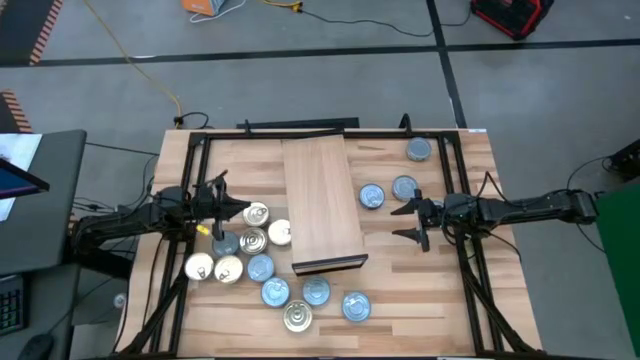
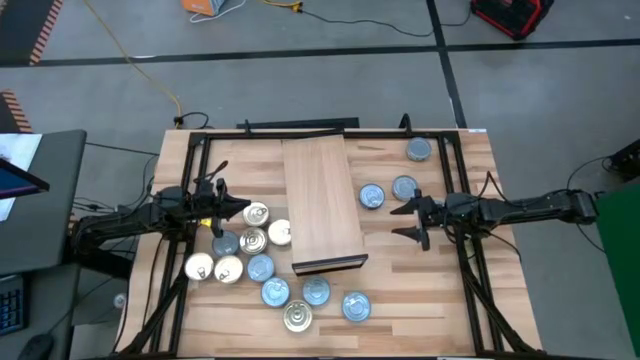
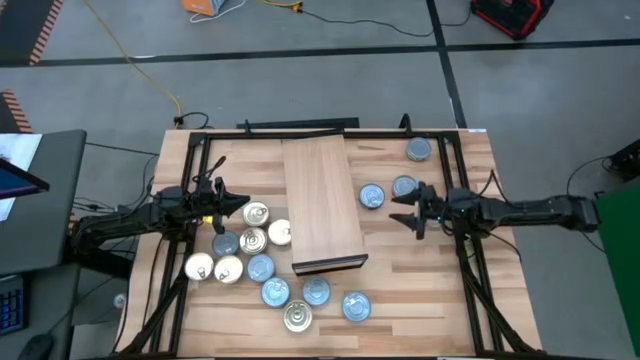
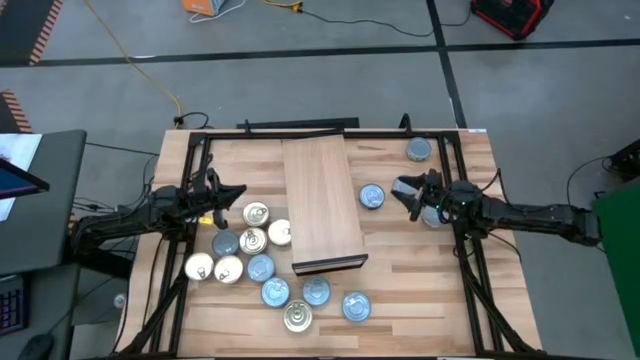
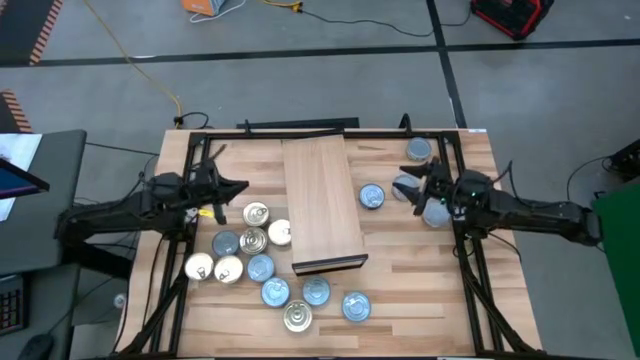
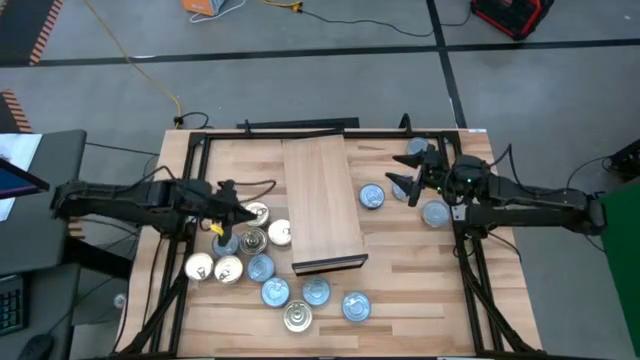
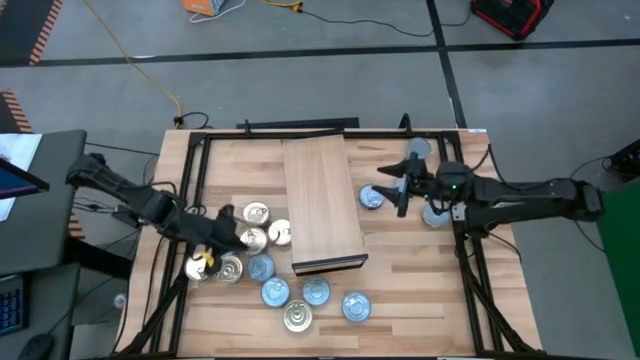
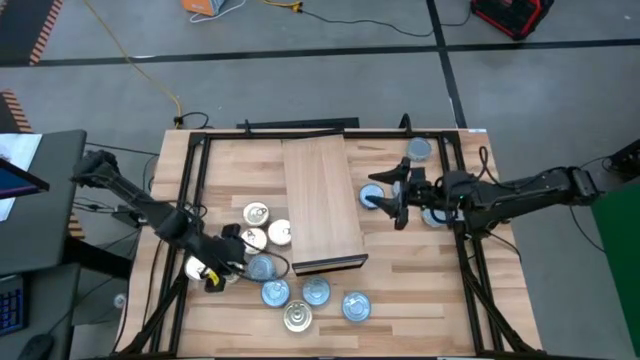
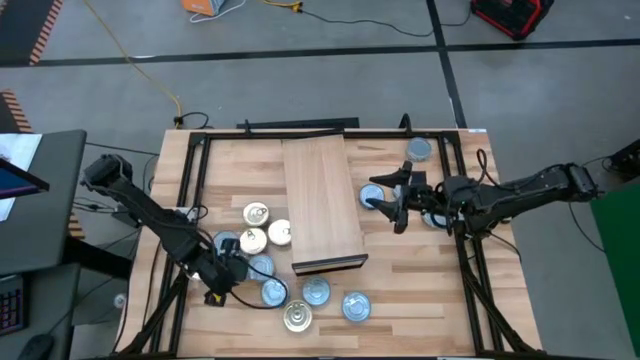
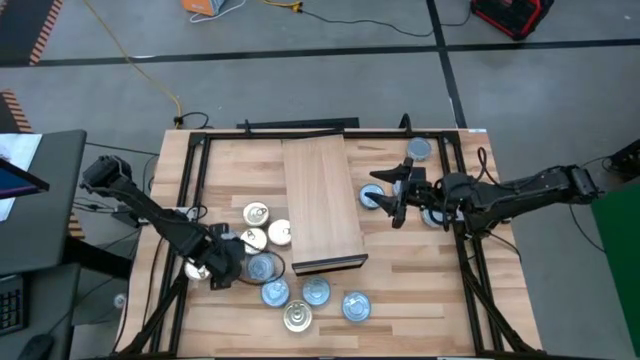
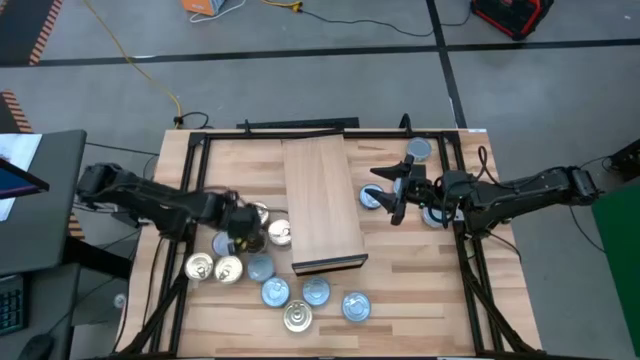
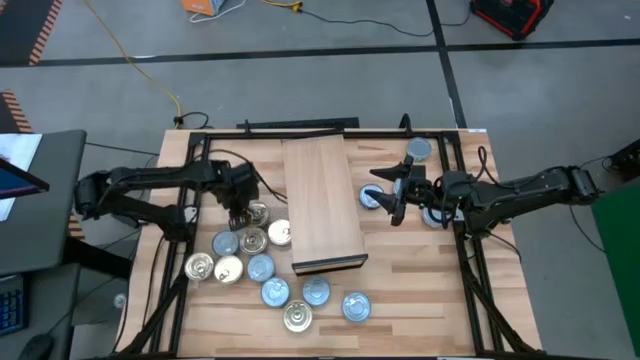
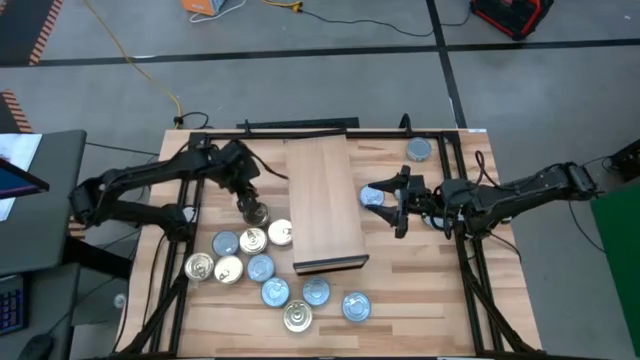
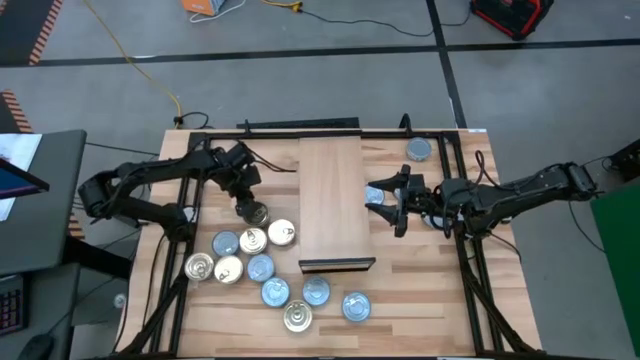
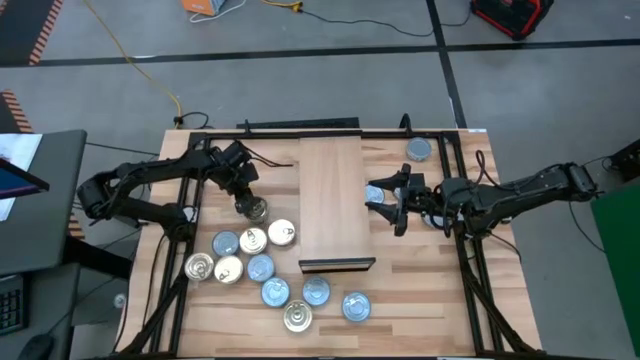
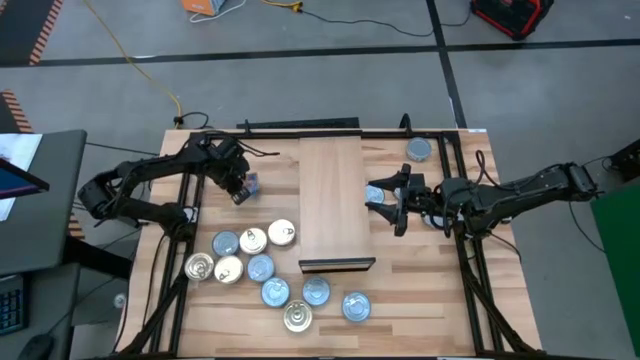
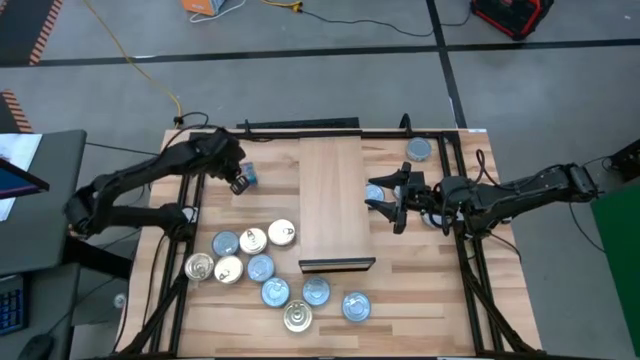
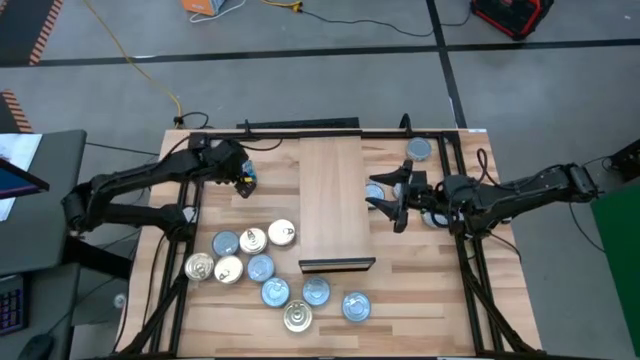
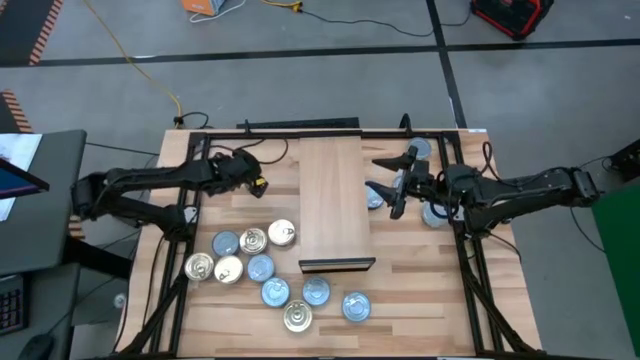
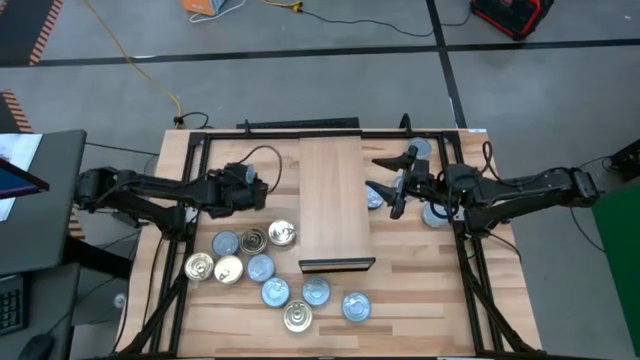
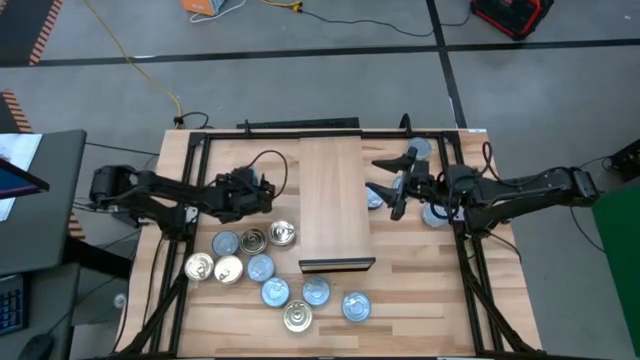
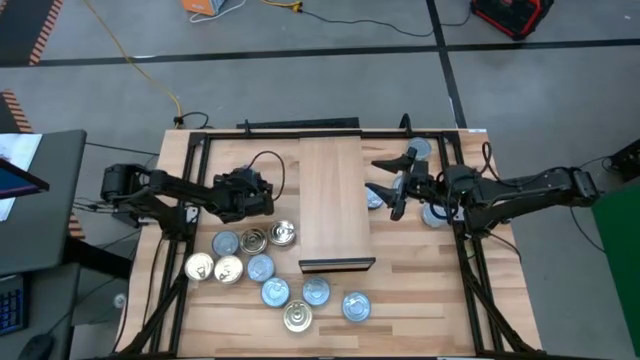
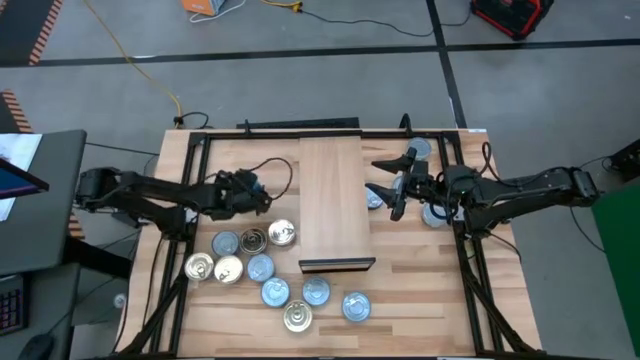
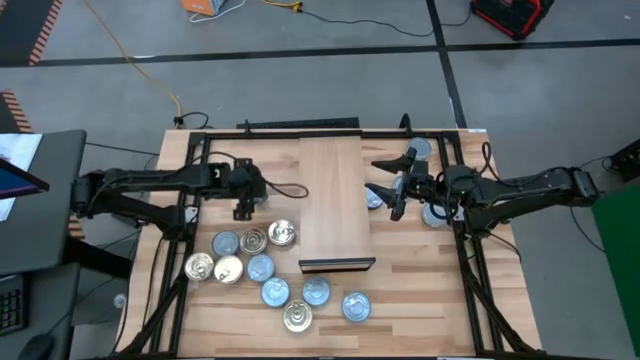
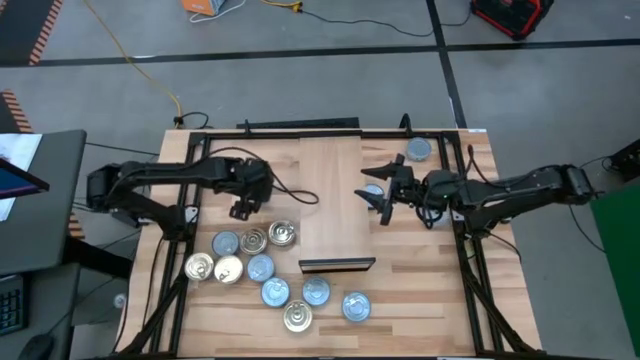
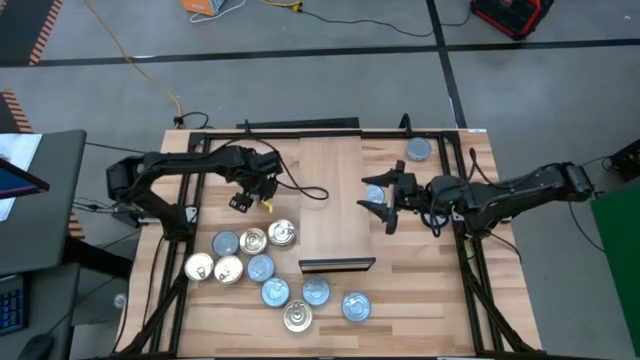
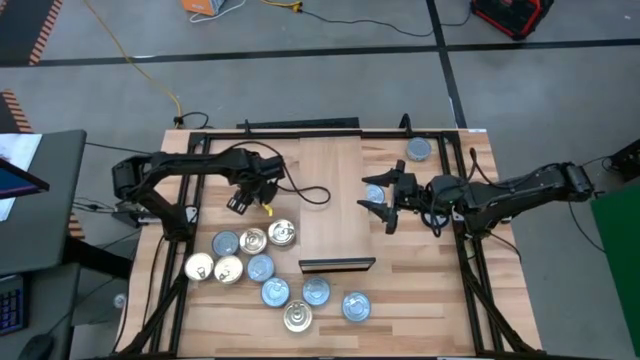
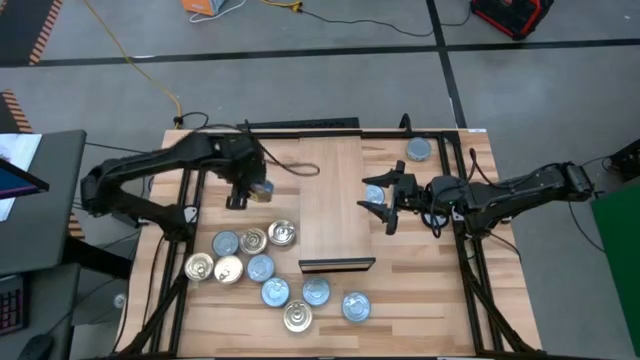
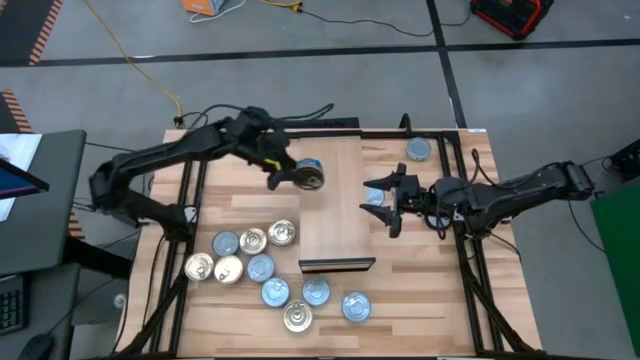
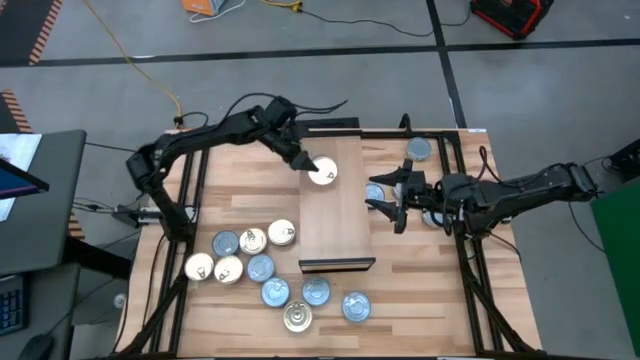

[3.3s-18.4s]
Task: Stack canned seafood by type on shelf
Put the blue and pink tuna can on the shelf

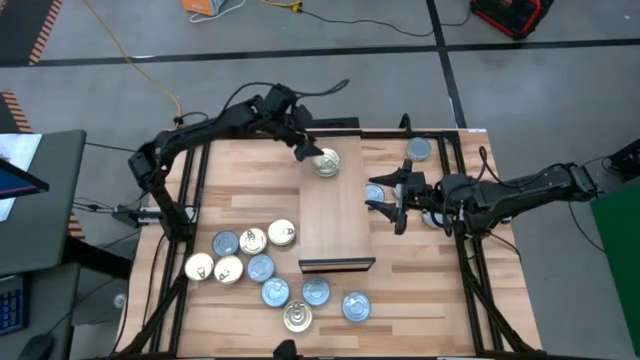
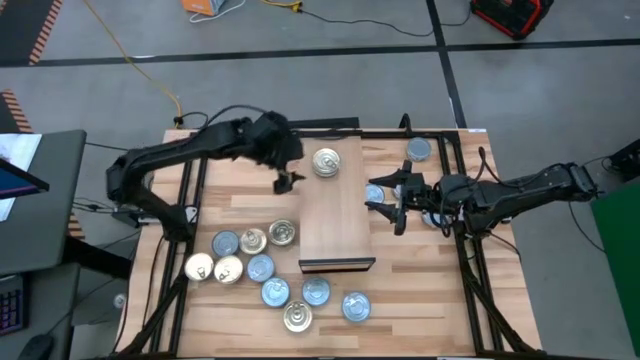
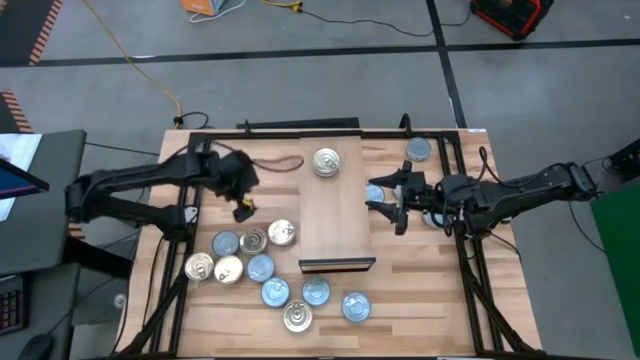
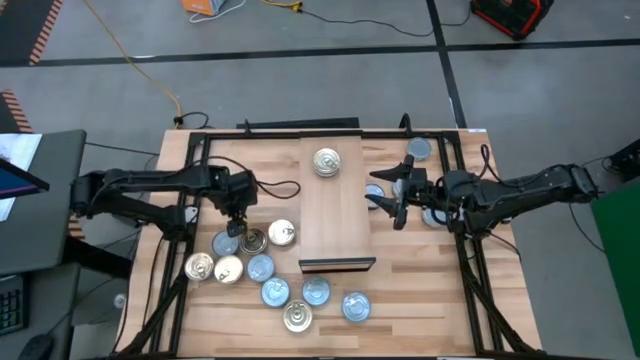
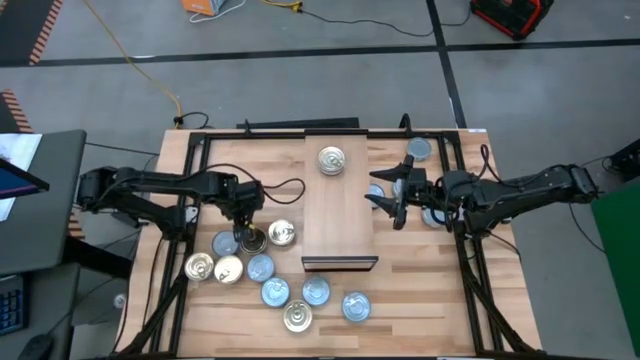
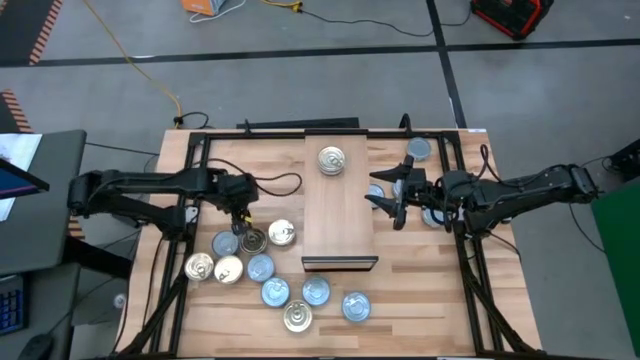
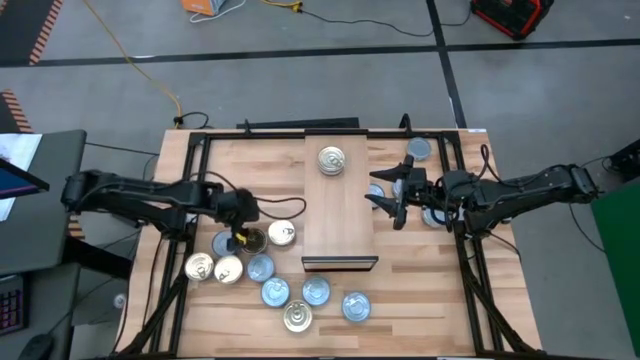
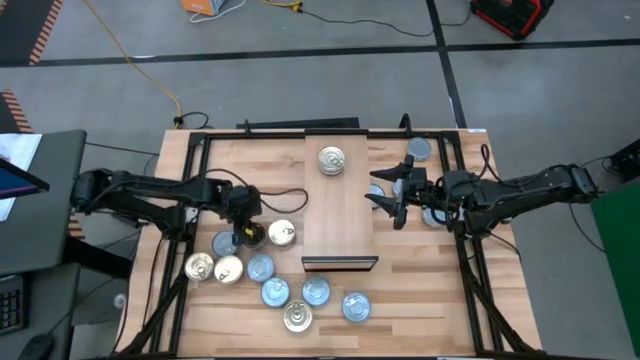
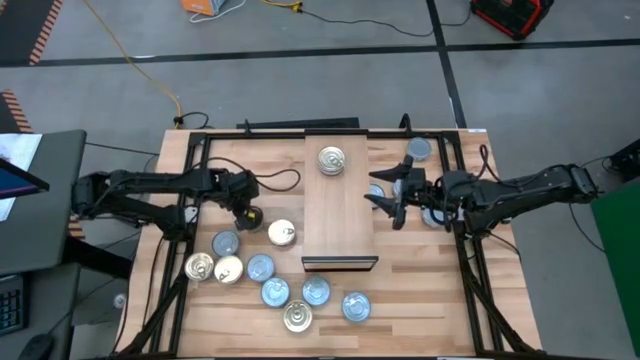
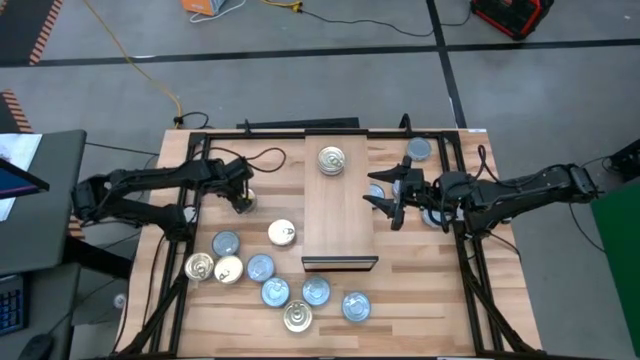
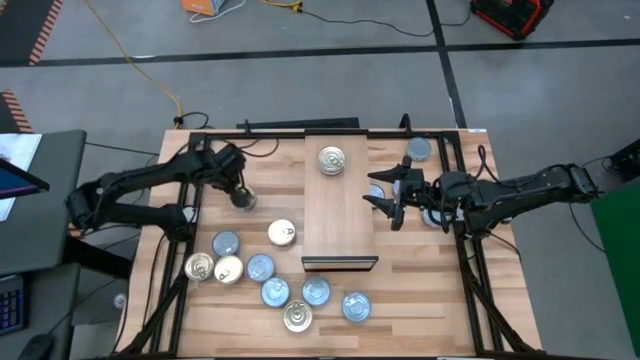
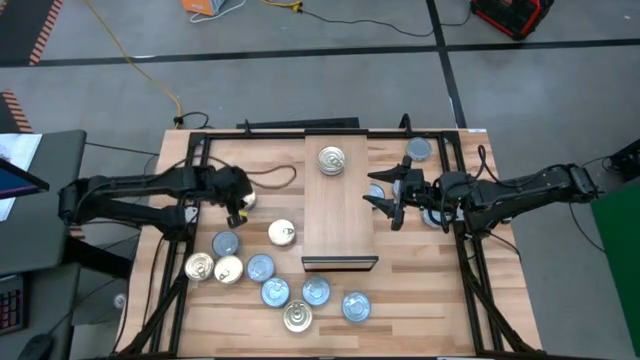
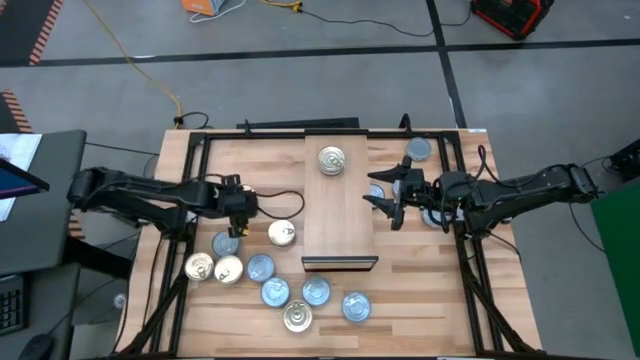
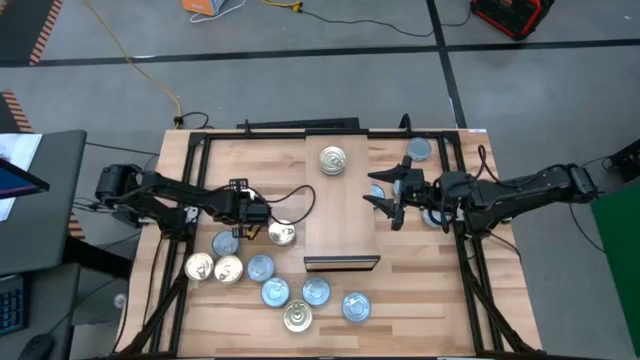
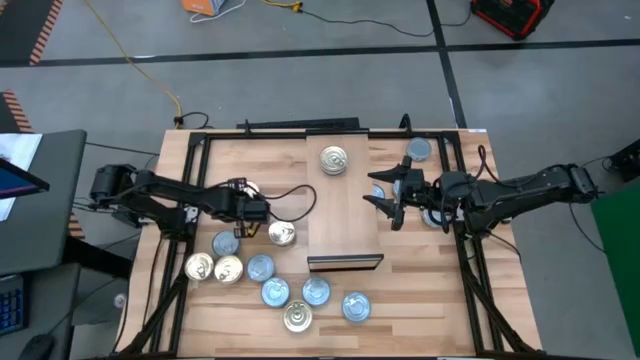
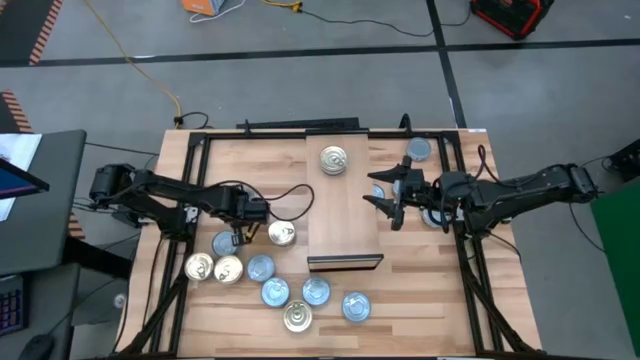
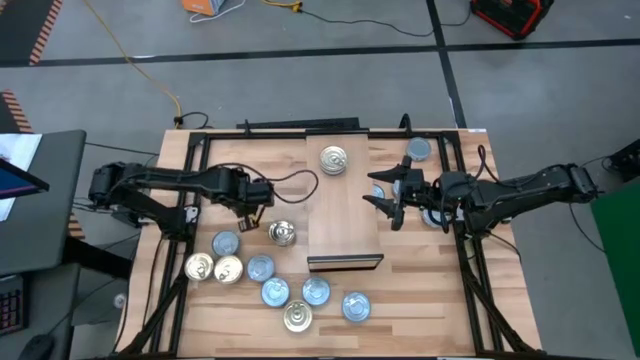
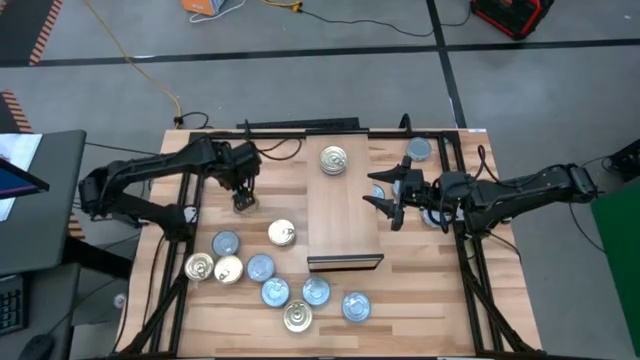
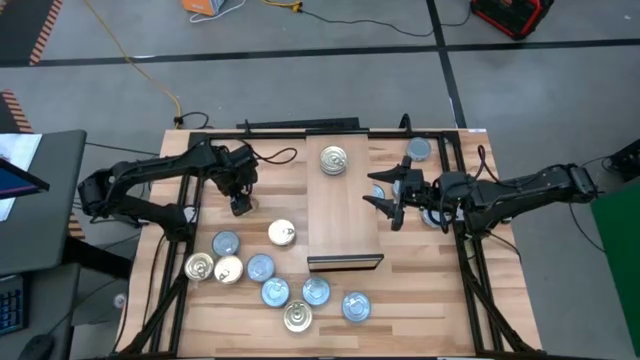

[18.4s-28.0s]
Stack the blue and pink tuna can on the shelf on top of the other blue and pink tuna can
